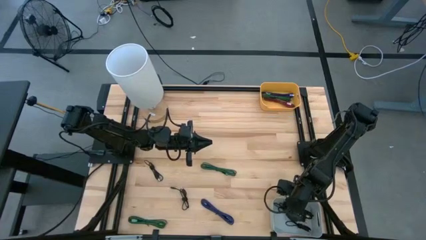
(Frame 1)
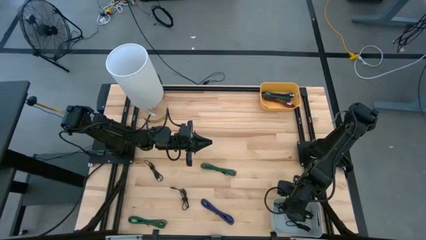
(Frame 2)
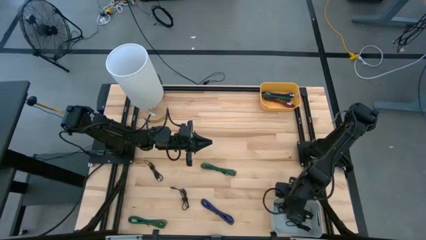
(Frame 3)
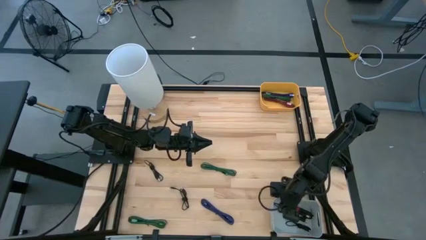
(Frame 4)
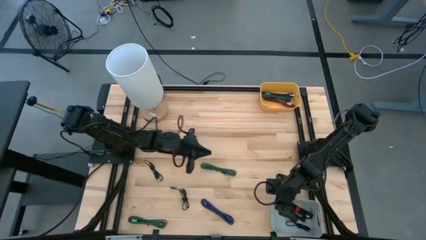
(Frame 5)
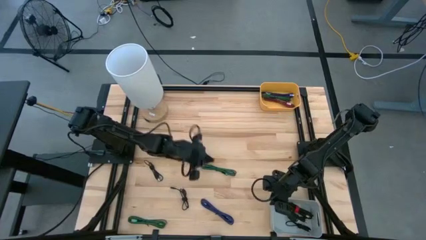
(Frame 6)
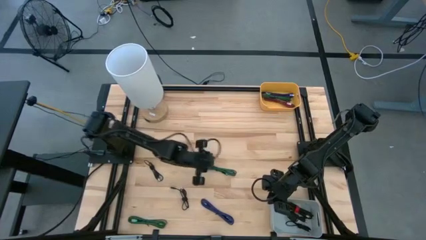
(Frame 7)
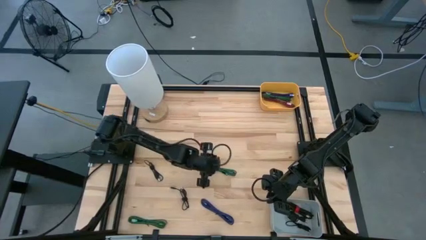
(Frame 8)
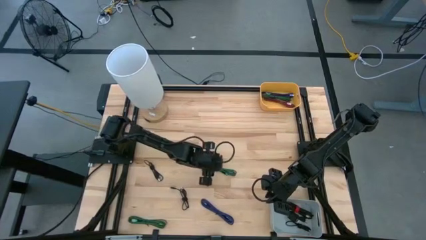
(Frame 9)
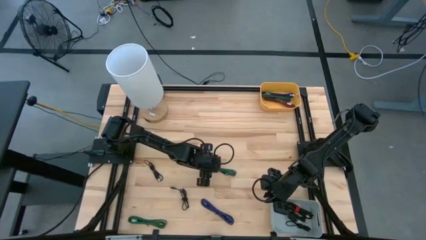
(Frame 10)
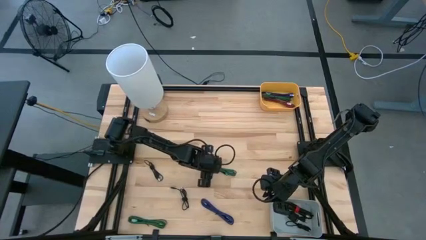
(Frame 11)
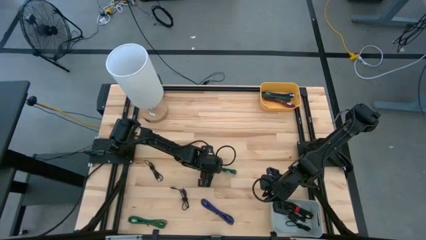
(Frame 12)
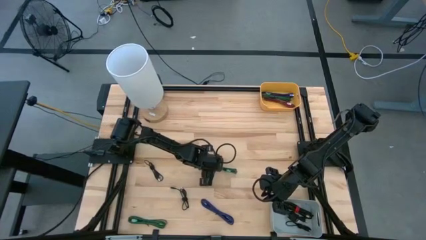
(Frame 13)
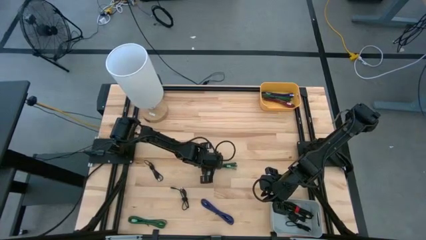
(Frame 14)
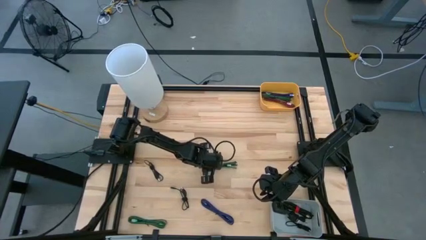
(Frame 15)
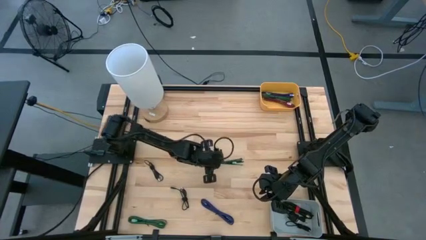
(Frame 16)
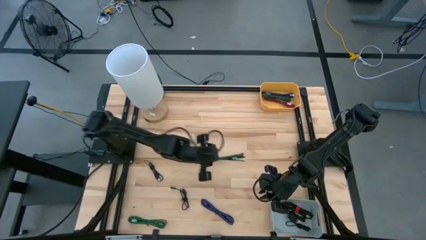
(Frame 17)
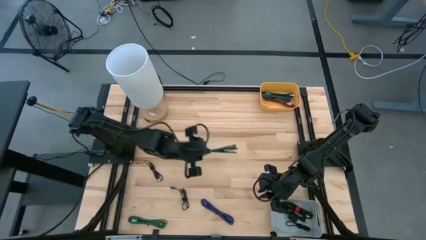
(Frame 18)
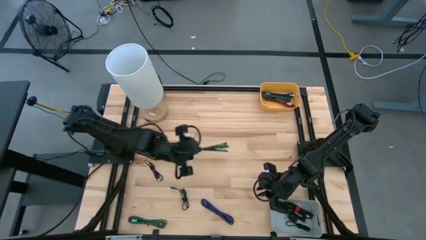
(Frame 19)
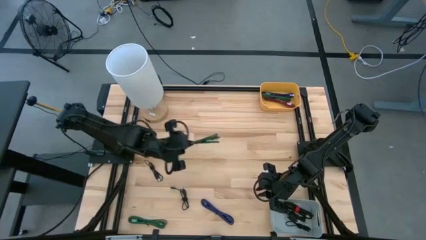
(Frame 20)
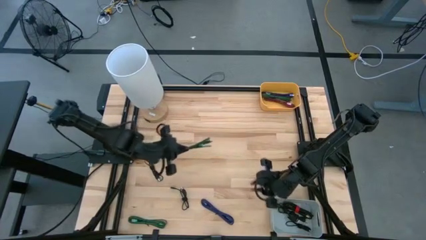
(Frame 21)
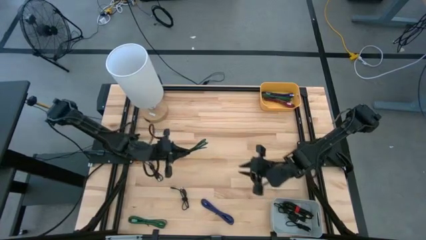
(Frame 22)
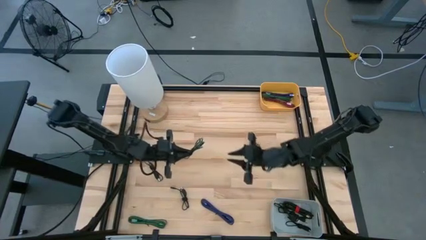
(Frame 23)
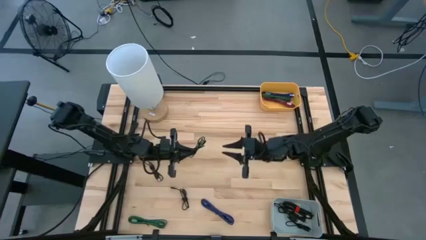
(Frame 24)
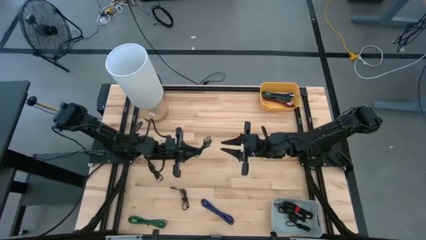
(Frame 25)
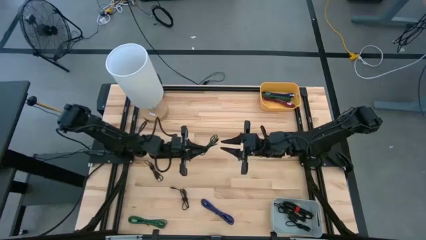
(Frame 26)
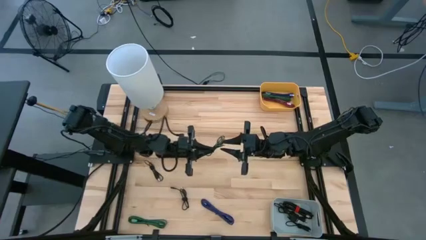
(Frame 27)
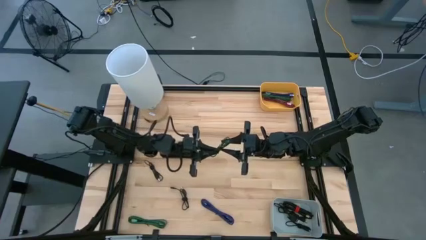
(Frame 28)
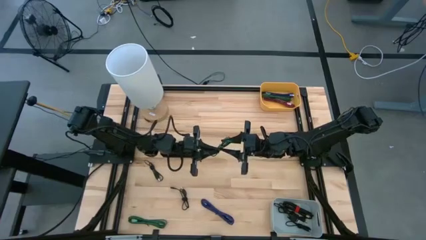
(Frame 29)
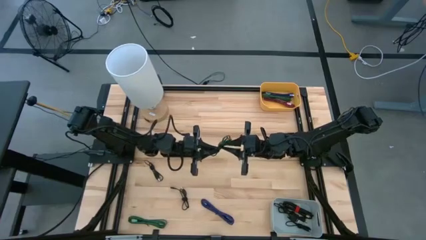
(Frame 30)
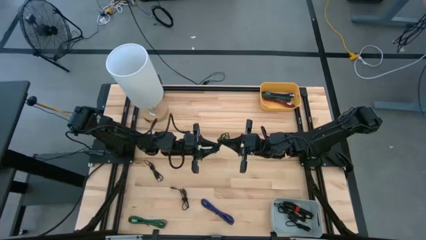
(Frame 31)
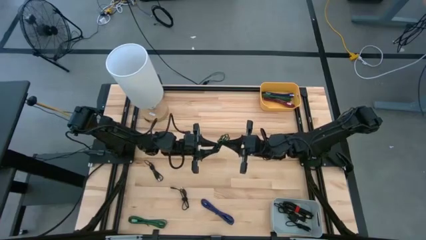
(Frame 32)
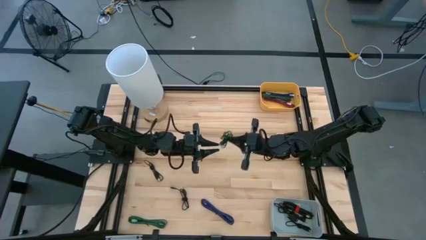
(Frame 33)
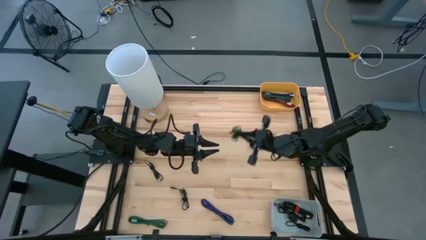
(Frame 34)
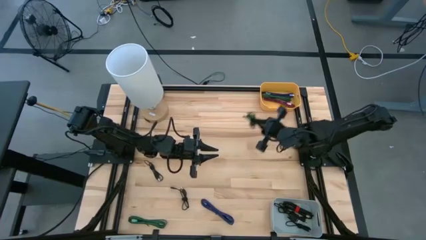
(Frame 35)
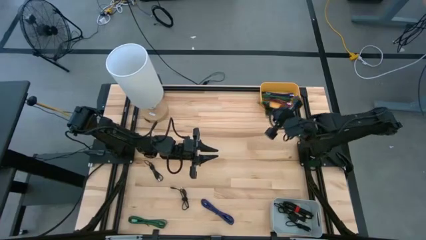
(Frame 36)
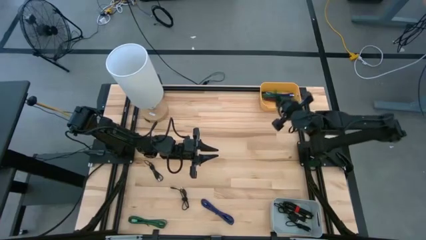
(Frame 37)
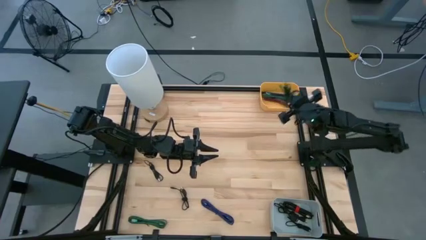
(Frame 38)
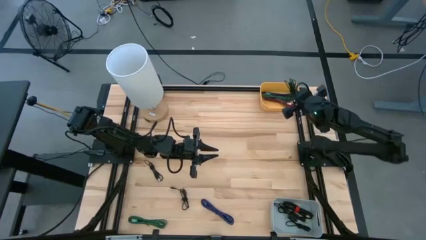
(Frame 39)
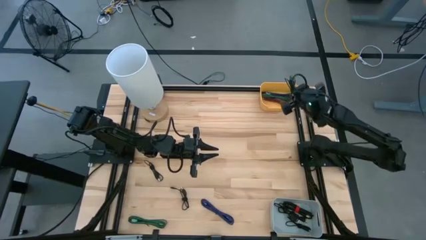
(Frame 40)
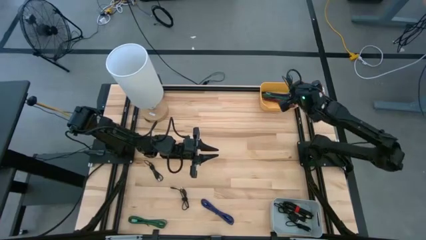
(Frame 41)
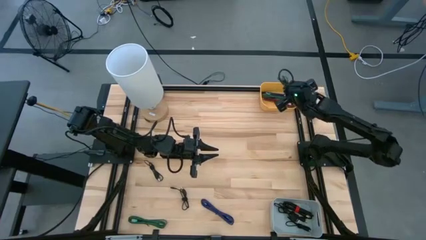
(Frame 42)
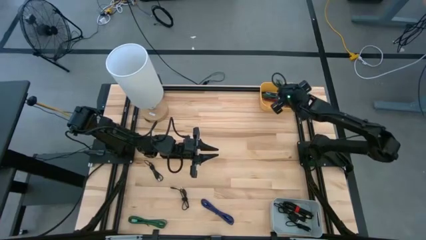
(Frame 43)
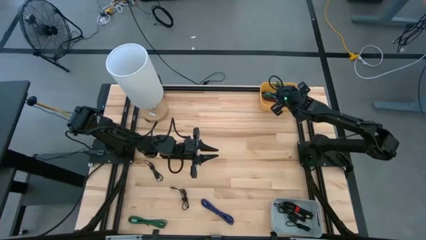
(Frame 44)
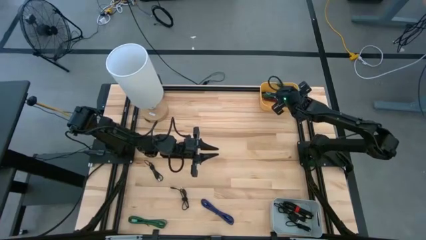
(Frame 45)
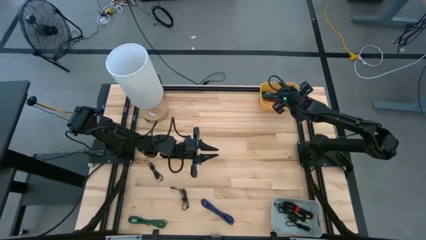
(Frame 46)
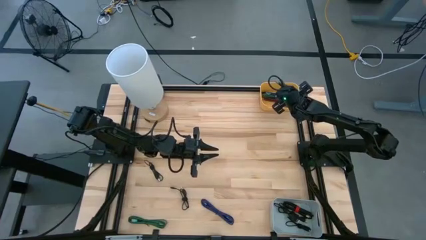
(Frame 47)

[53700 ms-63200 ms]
Task: Pick & Place USB Port
Put the black and green USB cable into the yellow bin

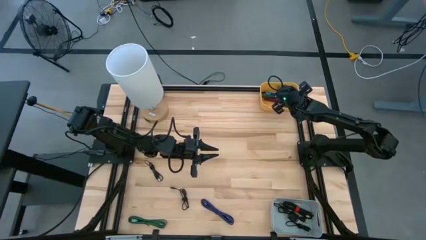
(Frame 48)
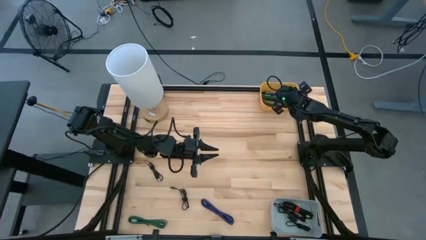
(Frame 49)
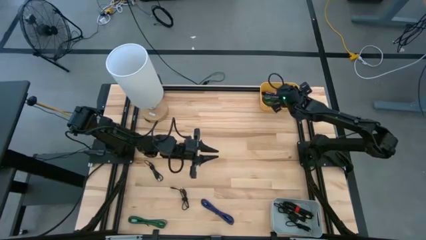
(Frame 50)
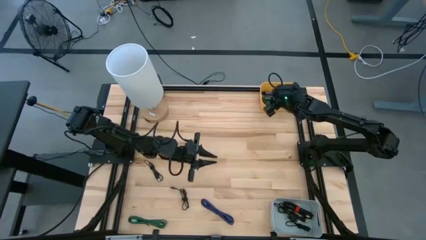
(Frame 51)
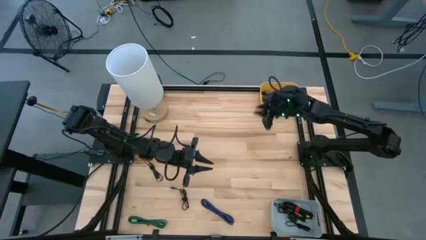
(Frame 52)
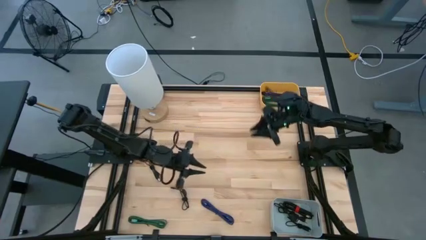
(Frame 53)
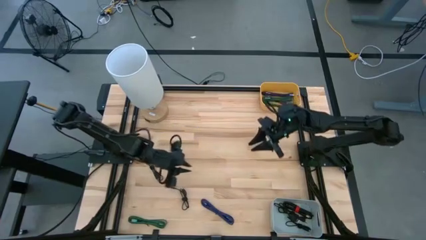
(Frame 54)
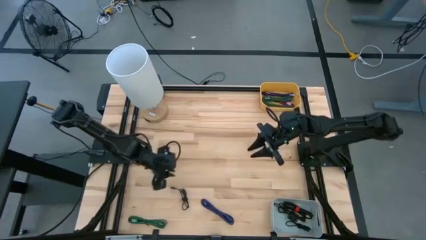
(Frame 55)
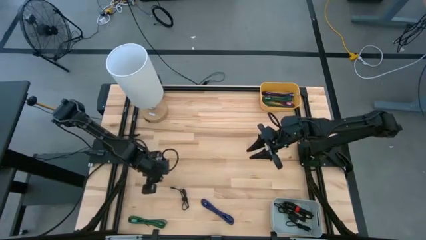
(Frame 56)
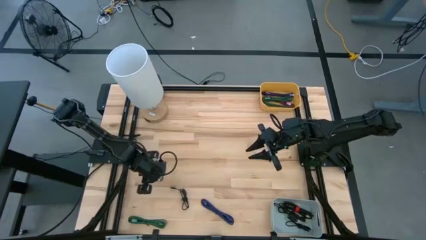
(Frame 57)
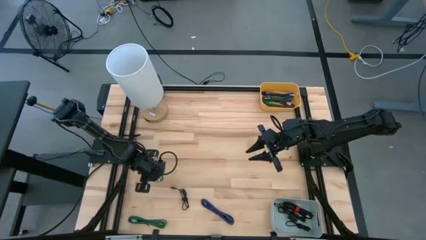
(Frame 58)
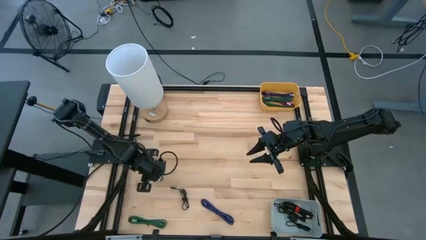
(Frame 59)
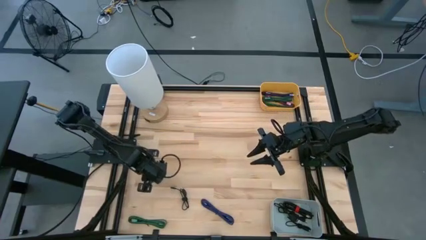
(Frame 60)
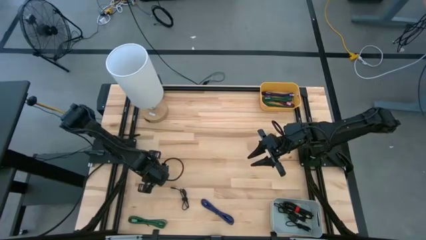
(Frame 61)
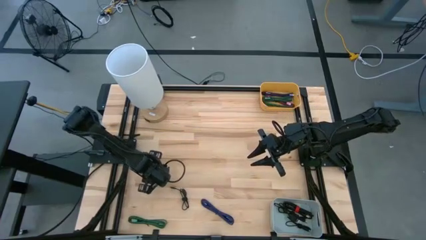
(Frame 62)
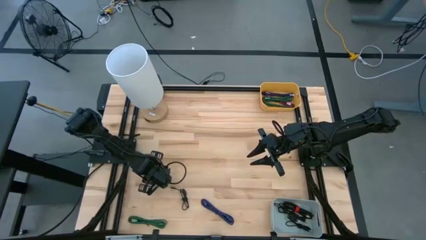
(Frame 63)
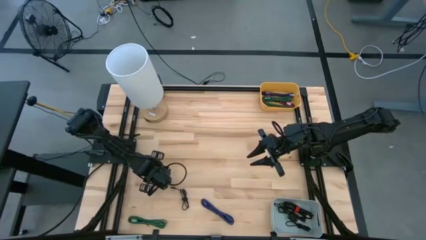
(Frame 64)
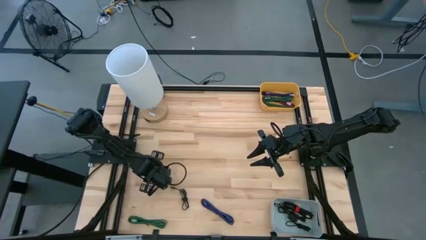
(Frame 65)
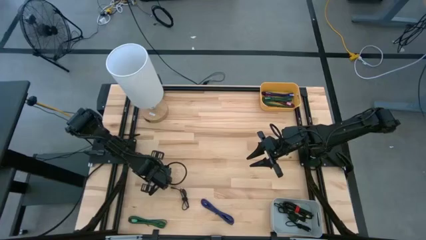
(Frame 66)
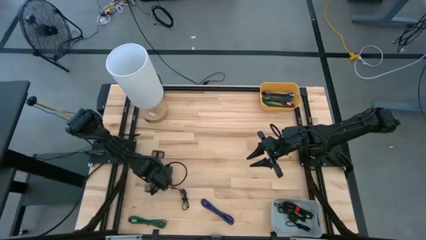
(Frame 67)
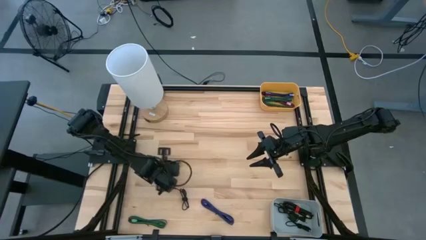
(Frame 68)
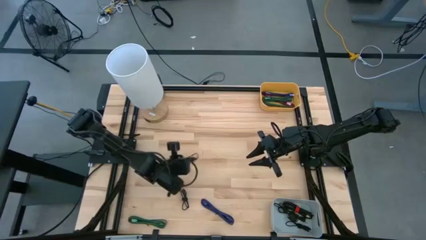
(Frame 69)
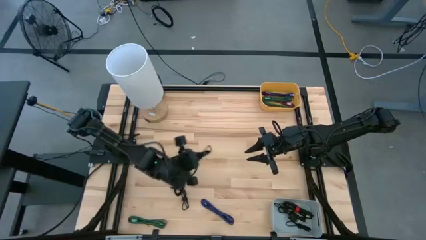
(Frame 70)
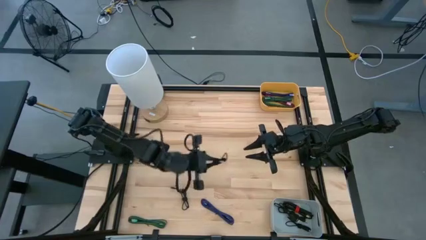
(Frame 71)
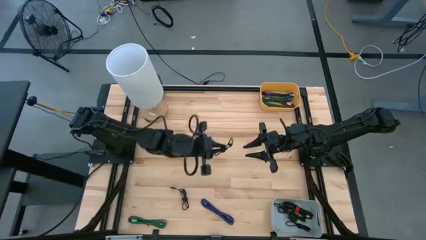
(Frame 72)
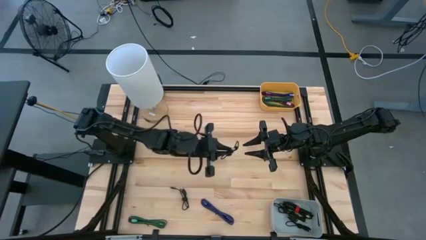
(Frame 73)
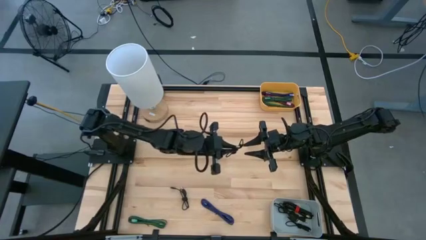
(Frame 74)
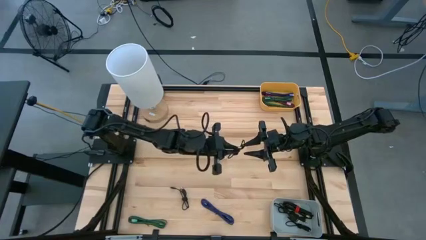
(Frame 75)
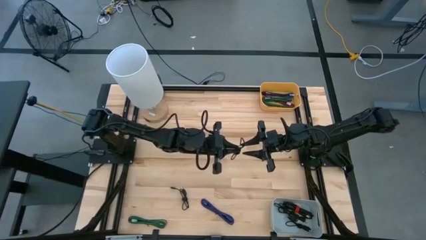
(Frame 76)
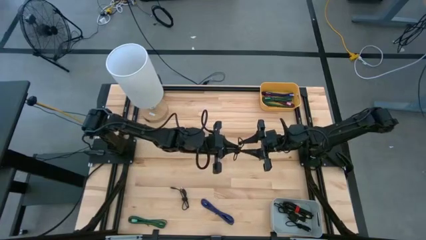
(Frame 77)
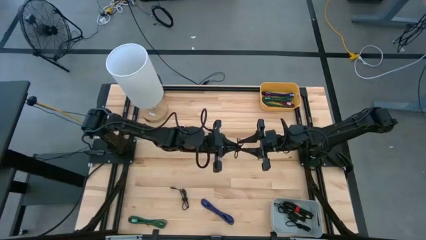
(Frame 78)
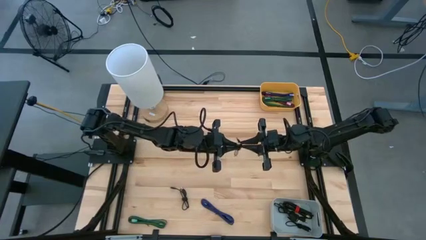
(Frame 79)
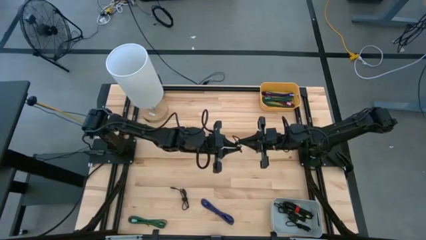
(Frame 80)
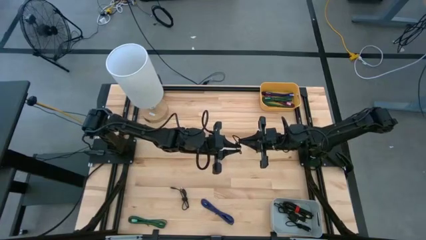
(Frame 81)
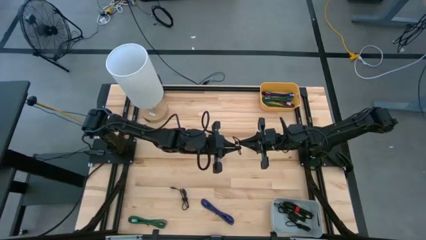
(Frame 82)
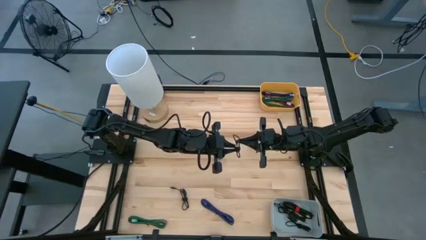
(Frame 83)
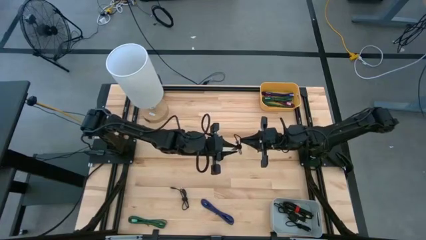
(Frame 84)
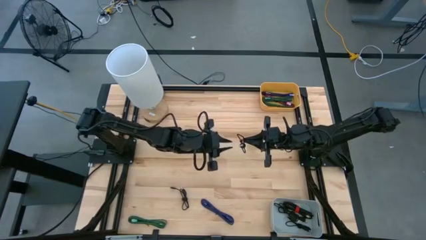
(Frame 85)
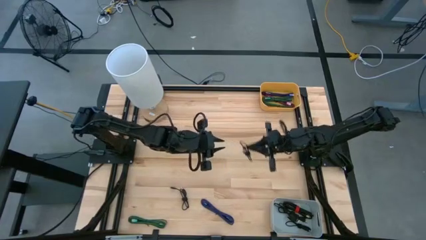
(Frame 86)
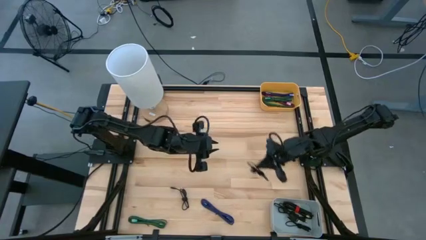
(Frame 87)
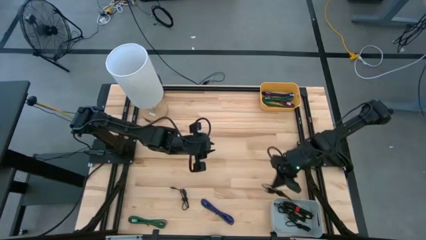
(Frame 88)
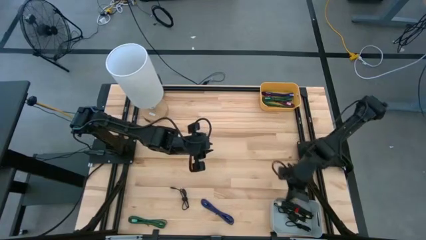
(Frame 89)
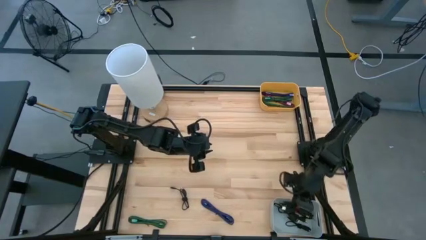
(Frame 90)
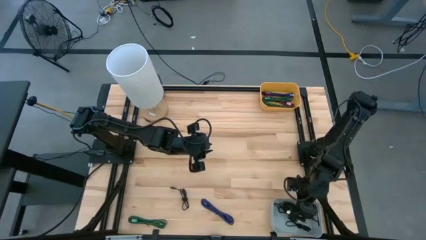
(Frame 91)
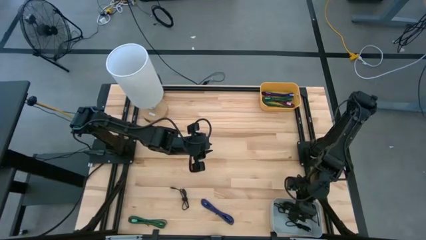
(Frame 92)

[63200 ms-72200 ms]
Put the black USB cable into the gray bin
